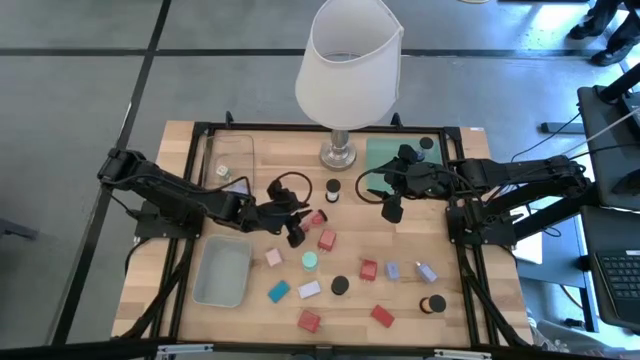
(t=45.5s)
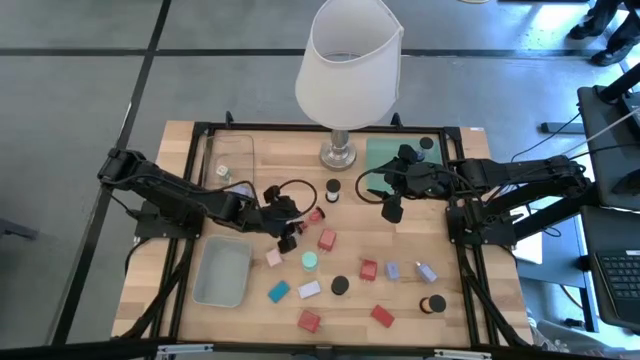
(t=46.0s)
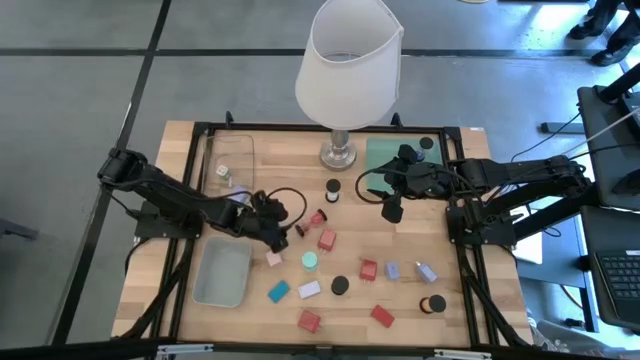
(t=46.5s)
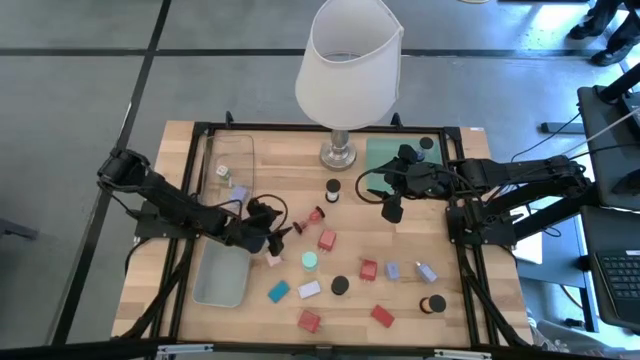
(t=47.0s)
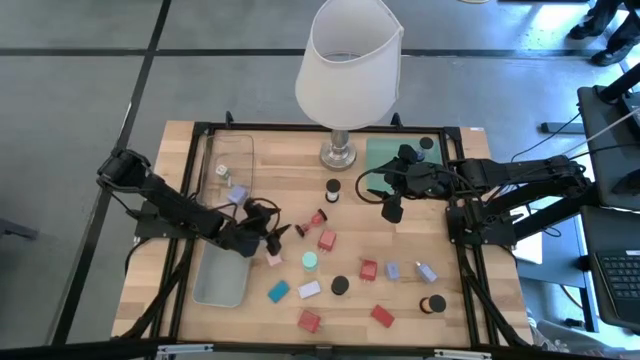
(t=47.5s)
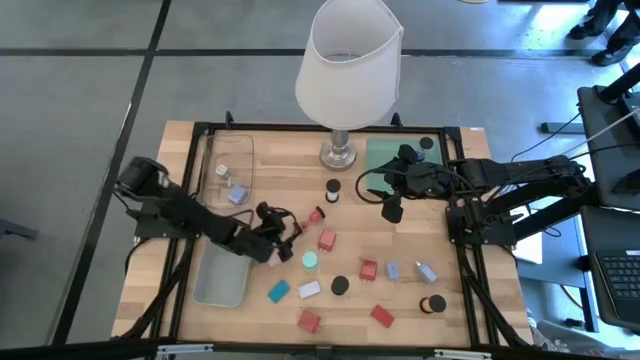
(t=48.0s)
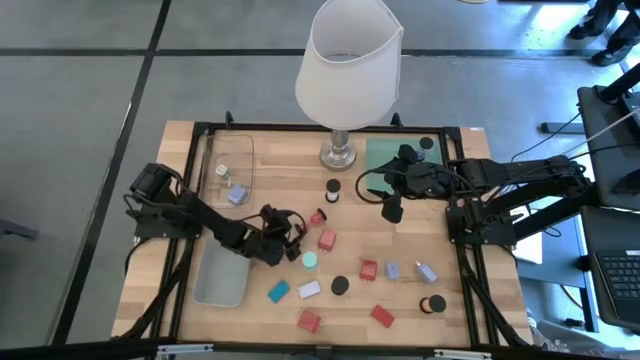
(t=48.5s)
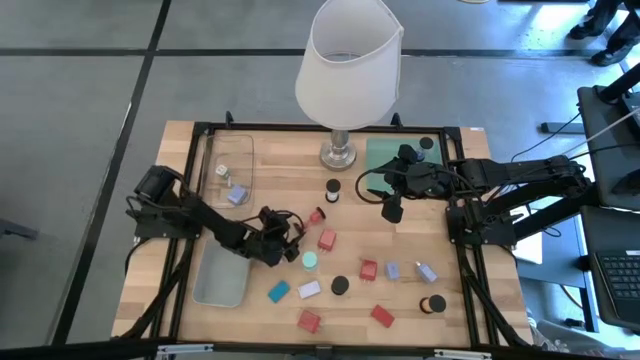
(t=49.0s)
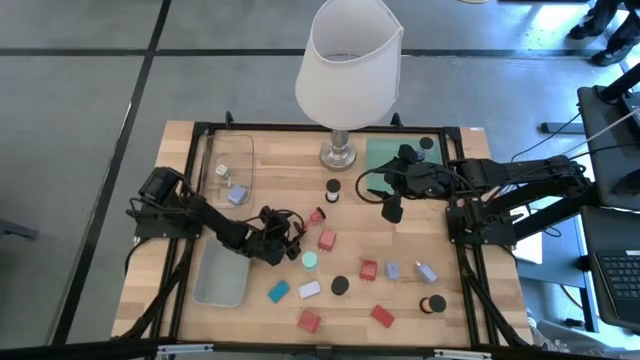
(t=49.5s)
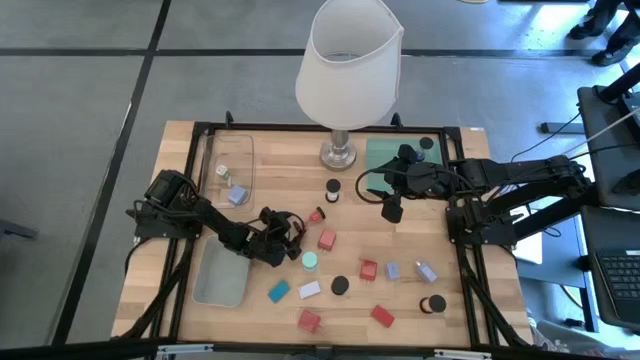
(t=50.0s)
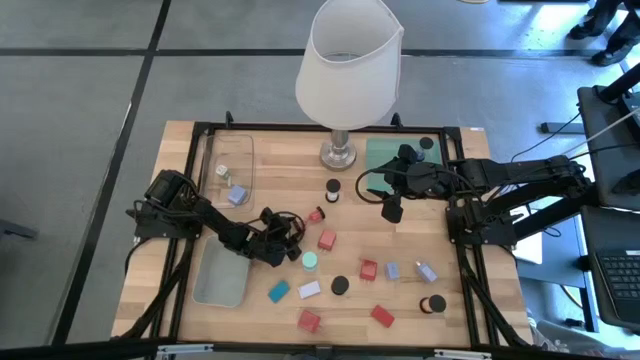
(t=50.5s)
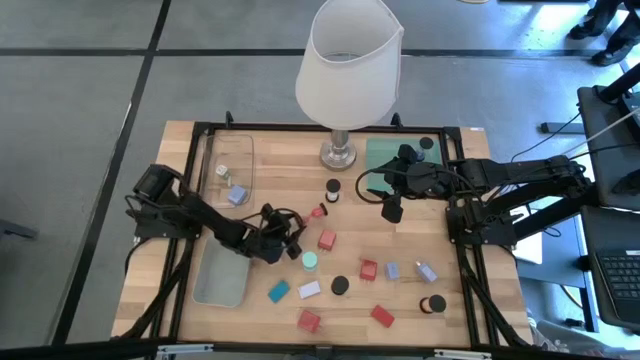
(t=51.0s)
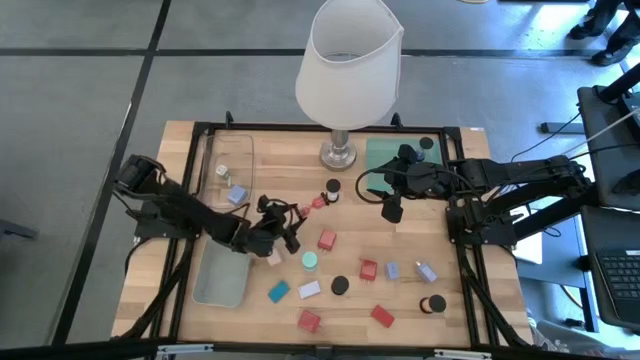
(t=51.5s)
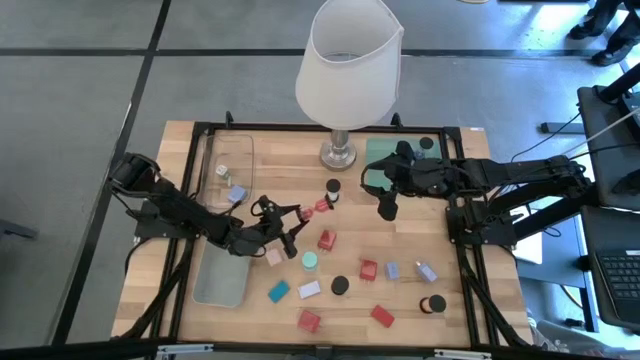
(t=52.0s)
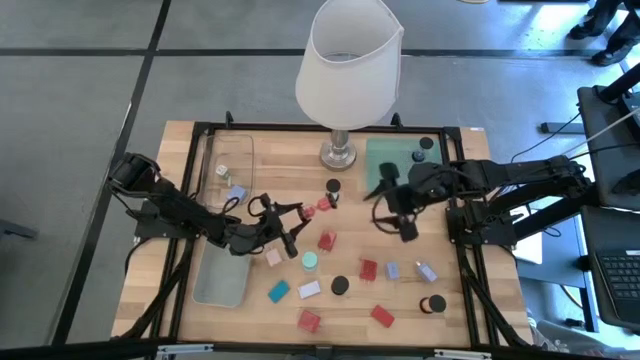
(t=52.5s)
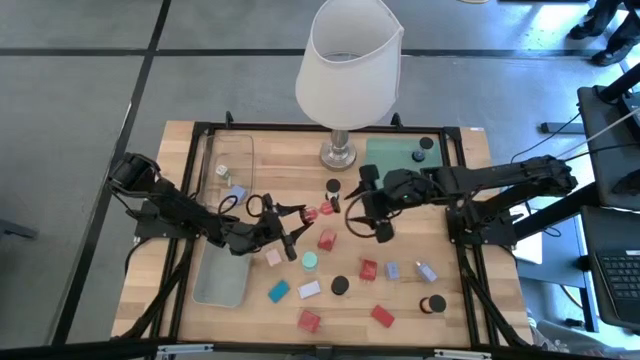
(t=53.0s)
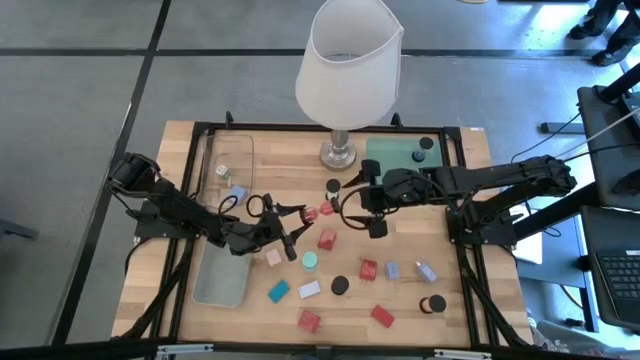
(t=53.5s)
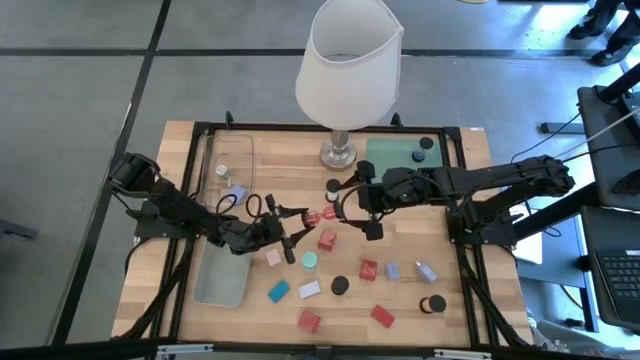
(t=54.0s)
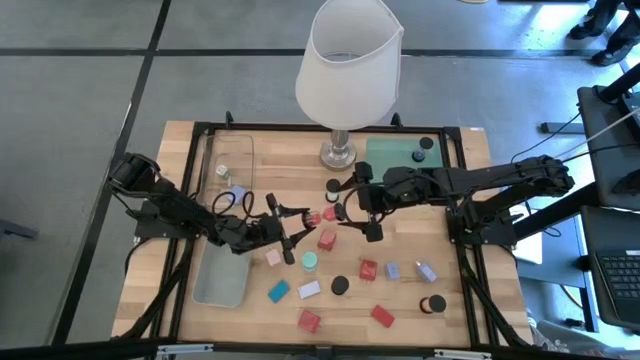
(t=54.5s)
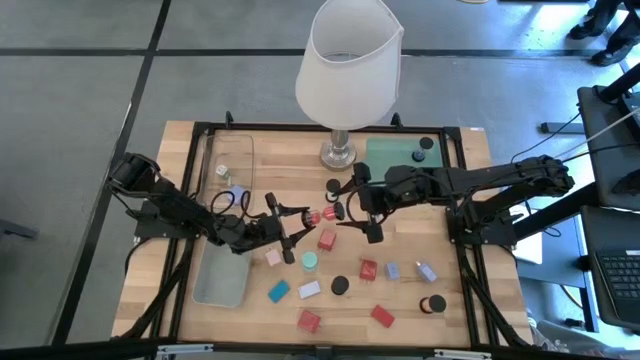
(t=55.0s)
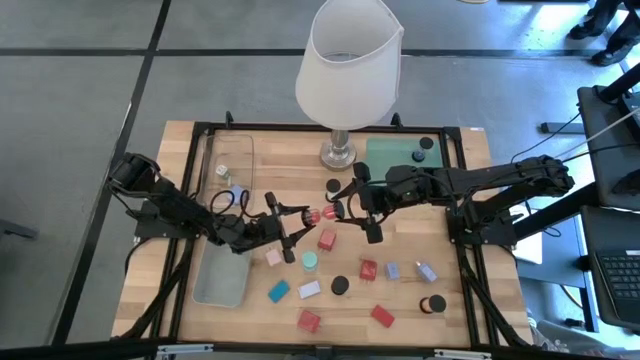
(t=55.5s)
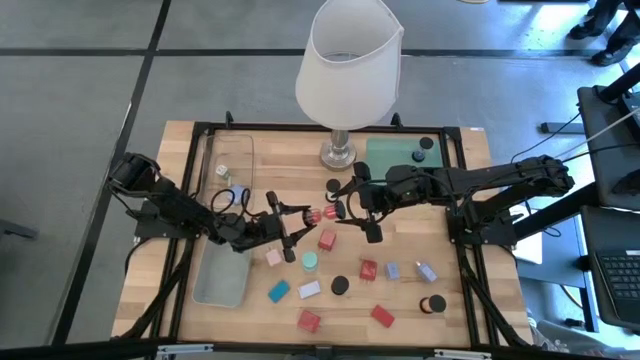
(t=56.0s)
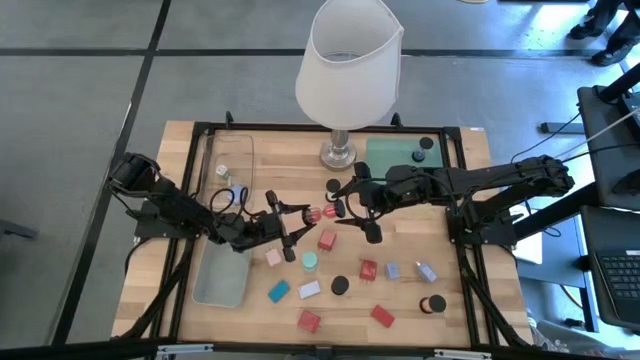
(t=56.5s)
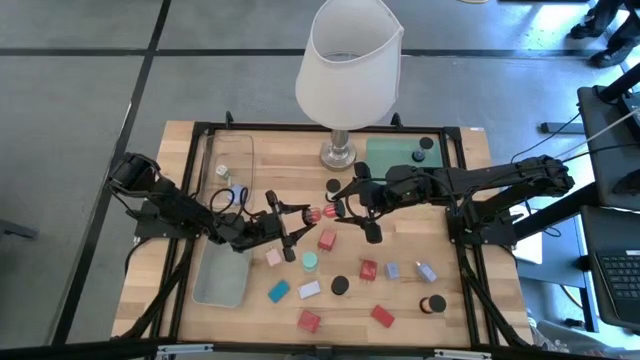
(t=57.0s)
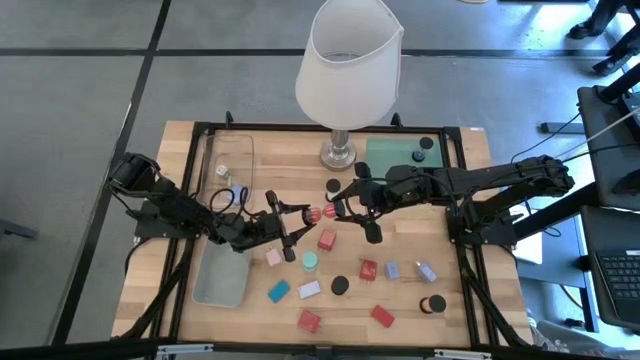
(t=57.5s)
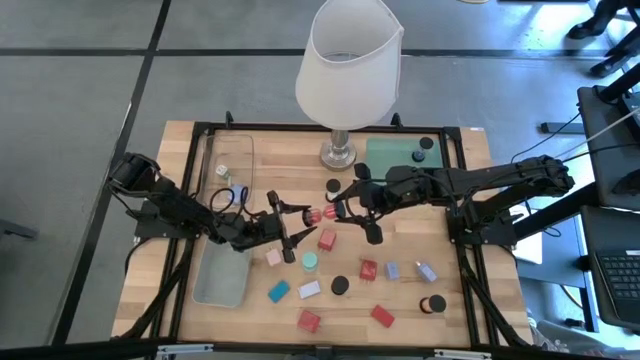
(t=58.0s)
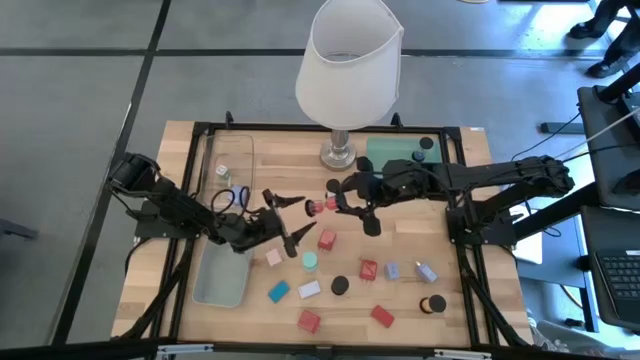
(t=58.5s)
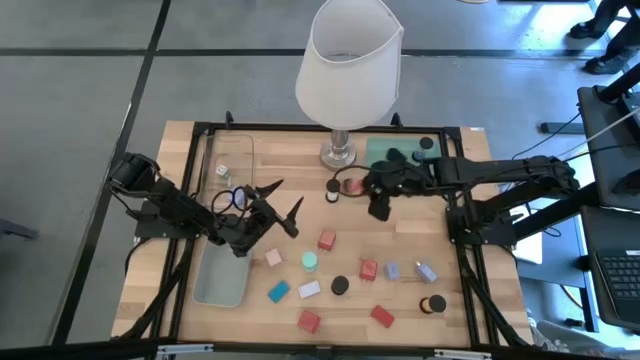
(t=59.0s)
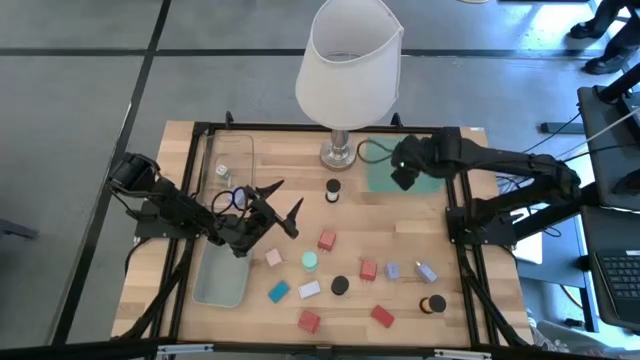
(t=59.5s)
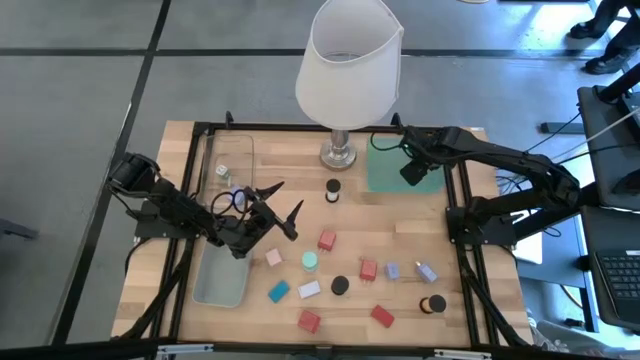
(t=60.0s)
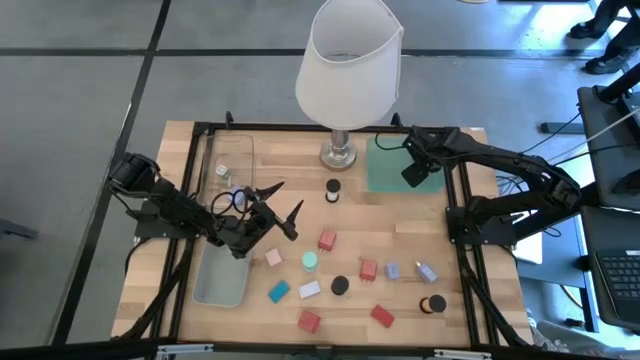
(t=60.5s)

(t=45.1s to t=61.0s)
Task: Pick & Place Office items
Put the red hourglass into the green bin

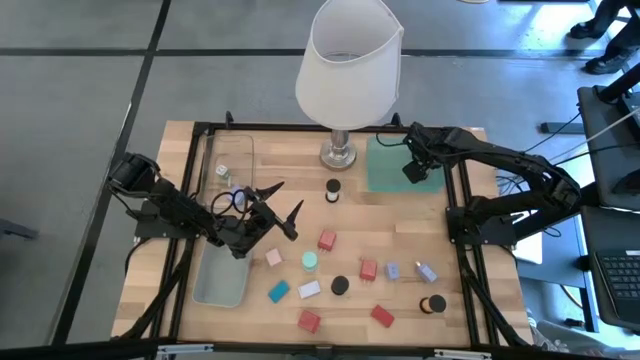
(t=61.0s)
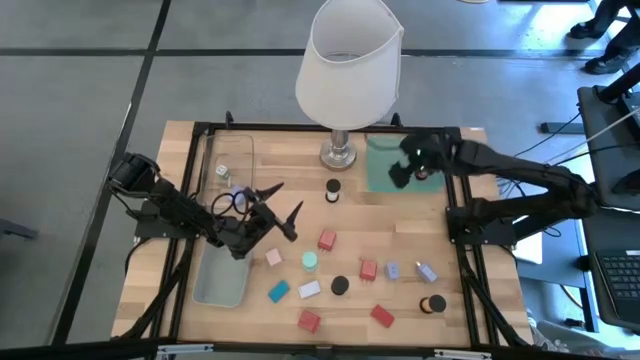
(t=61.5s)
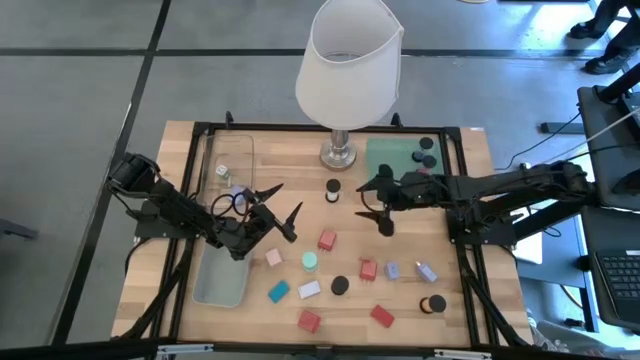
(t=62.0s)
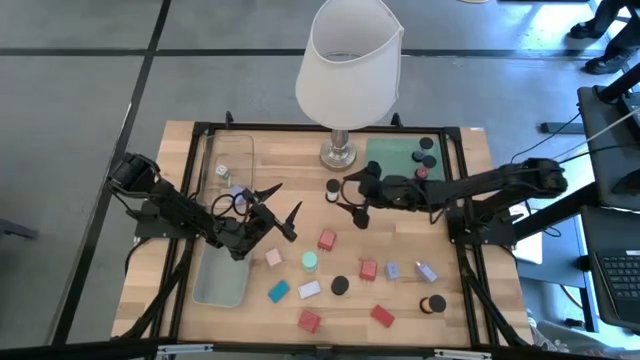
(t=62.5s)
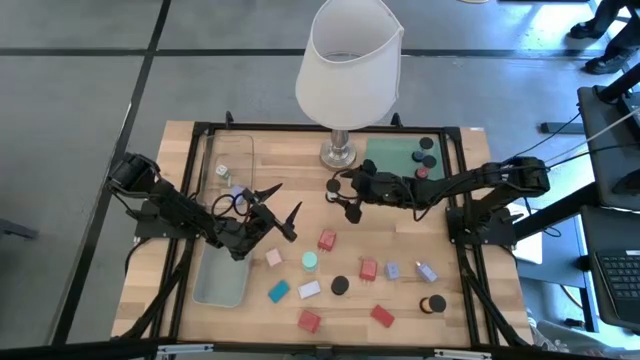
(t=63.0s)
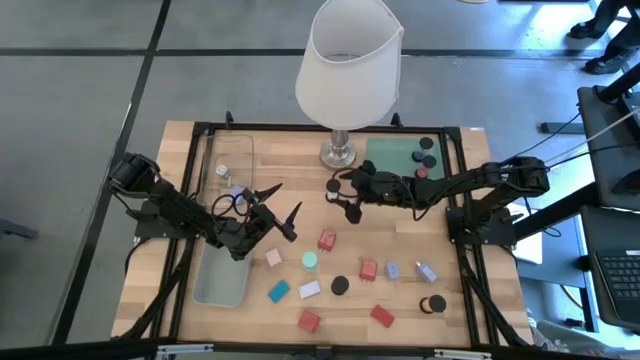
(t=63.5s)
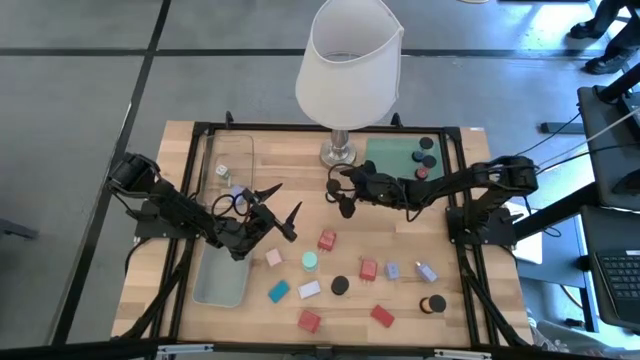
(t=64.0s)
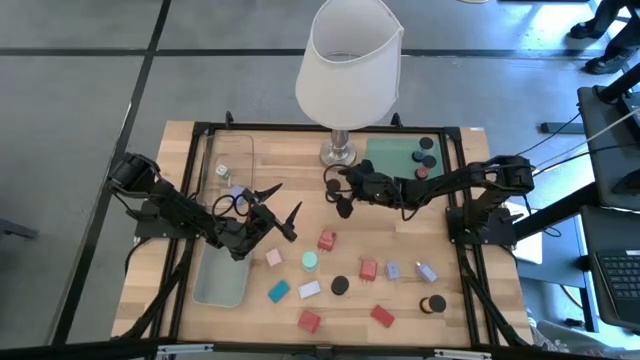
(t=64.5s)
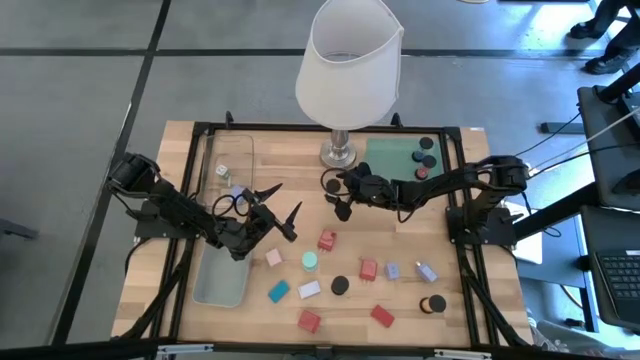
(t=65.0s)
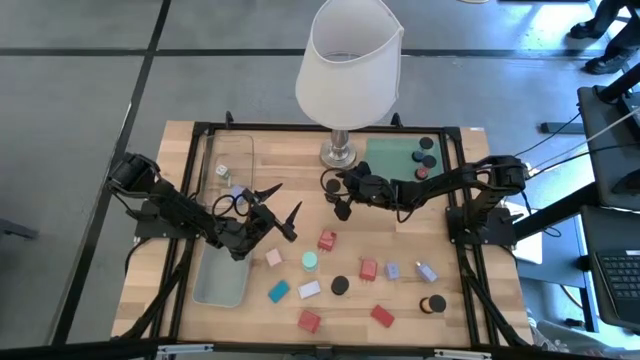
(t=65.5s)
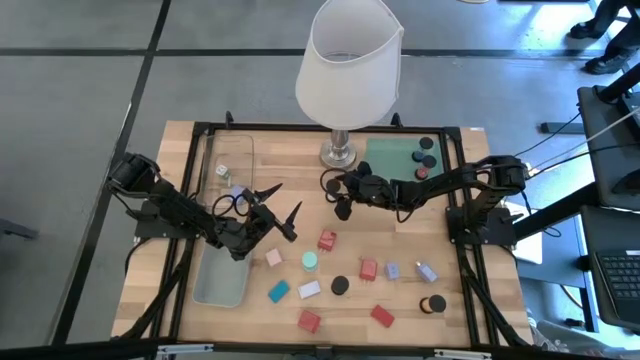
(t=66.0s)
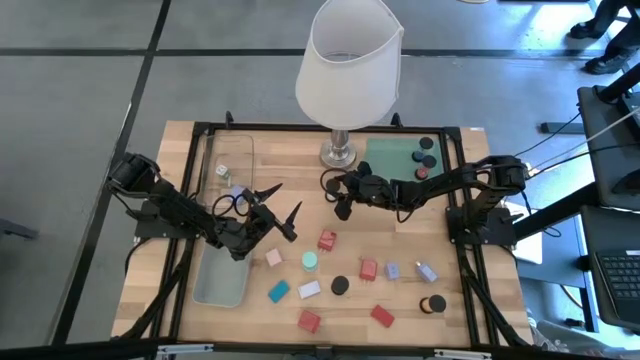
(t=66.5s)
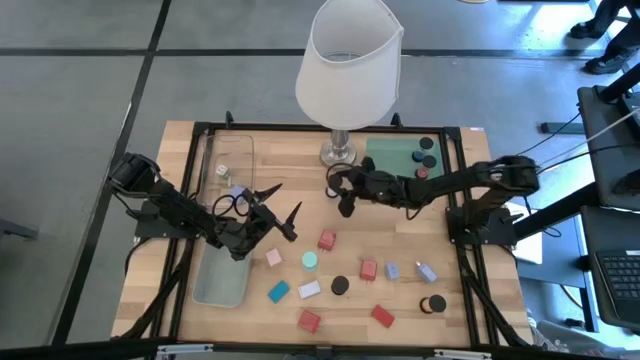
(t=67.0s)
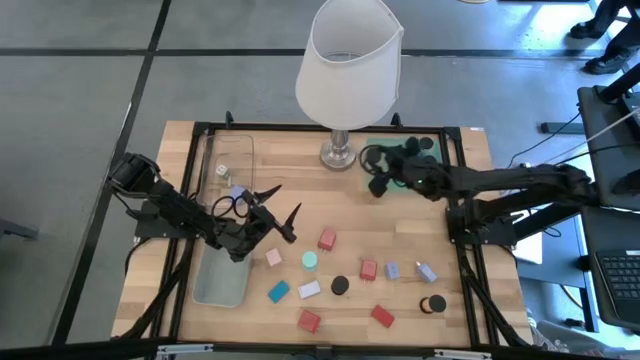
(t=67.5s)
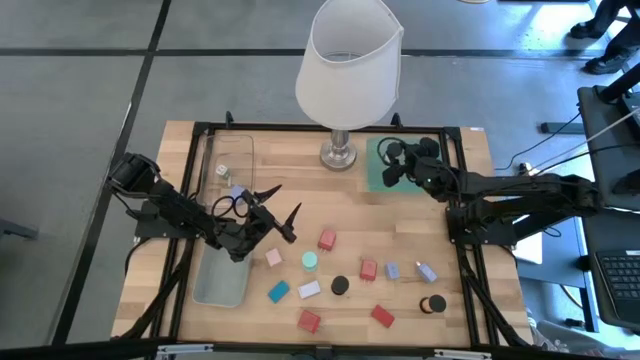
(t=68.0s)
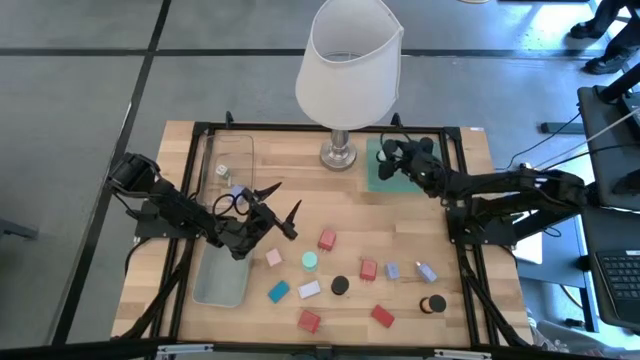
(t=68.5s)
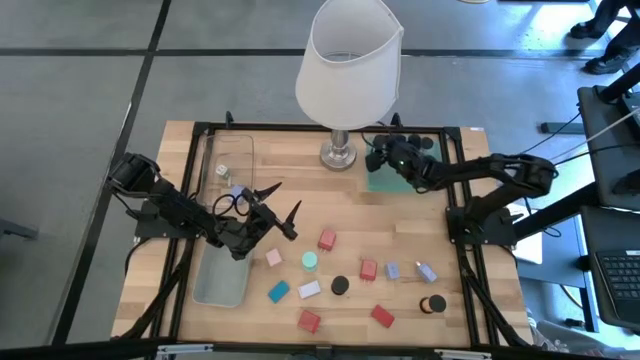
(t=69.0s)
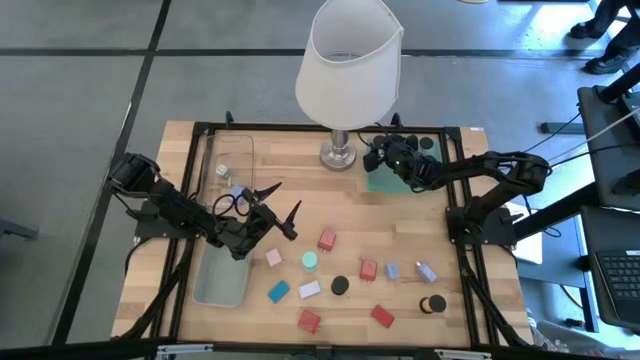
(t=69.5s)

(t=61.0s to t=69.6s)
Put the white hourglass into the green bin
